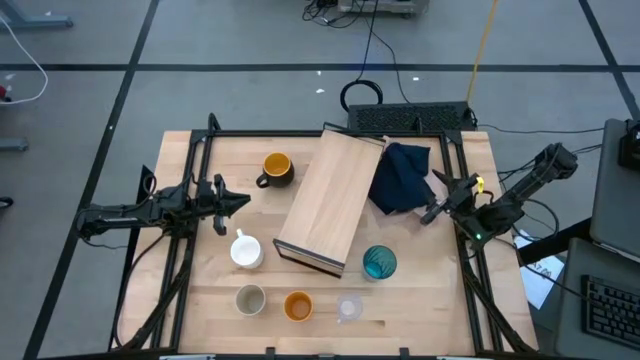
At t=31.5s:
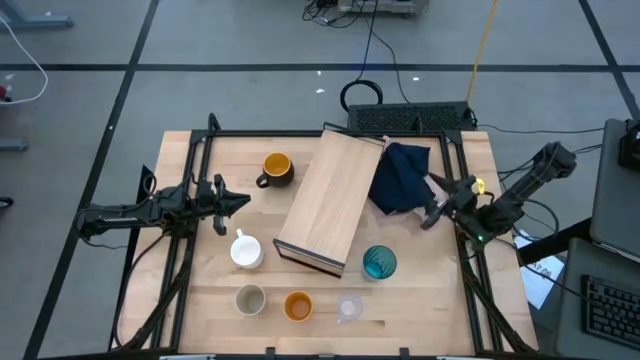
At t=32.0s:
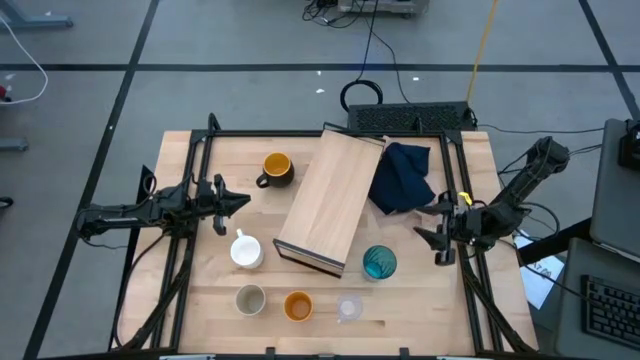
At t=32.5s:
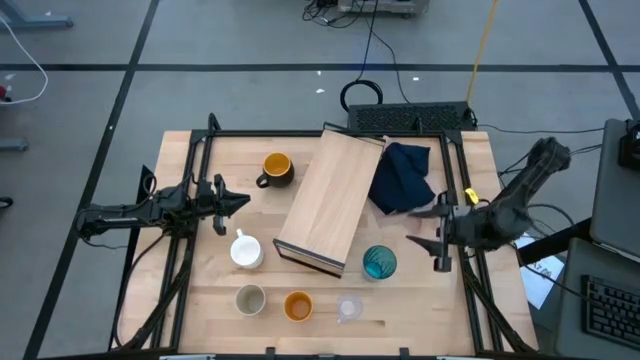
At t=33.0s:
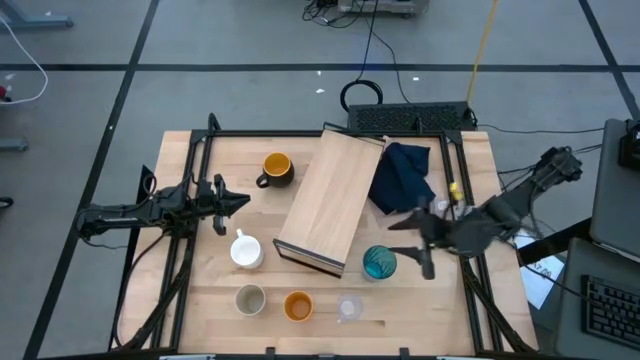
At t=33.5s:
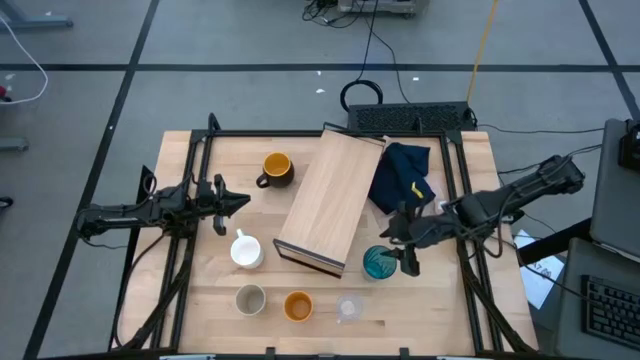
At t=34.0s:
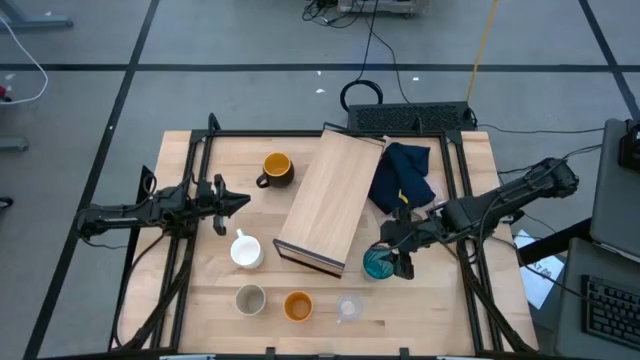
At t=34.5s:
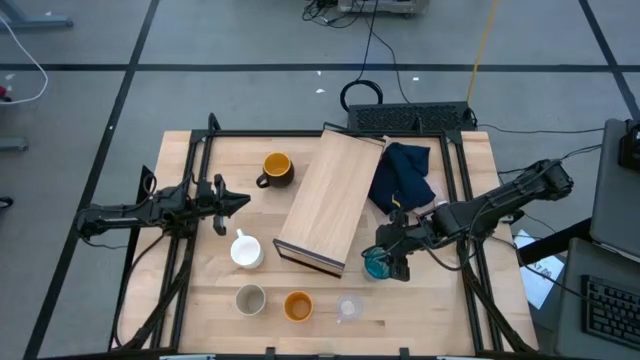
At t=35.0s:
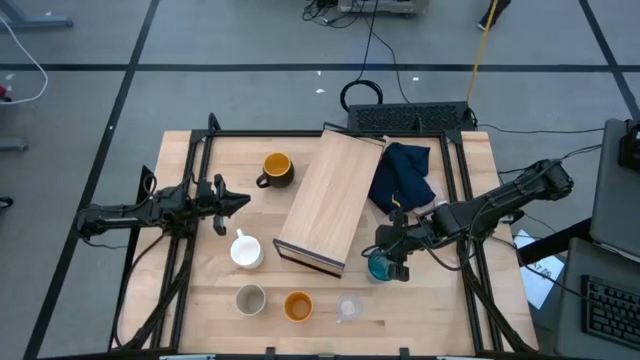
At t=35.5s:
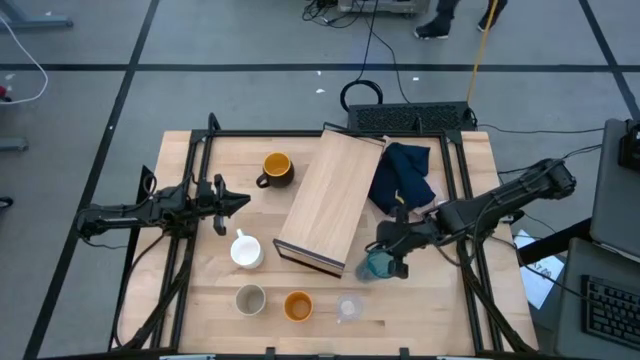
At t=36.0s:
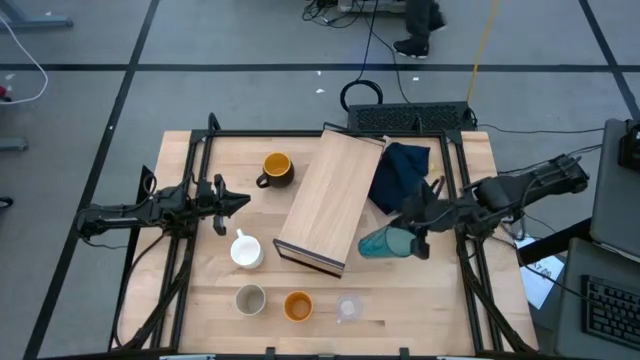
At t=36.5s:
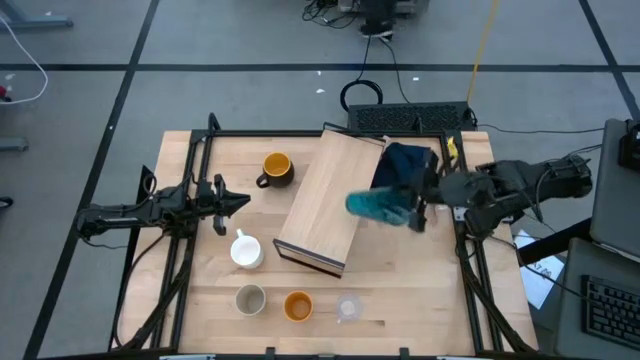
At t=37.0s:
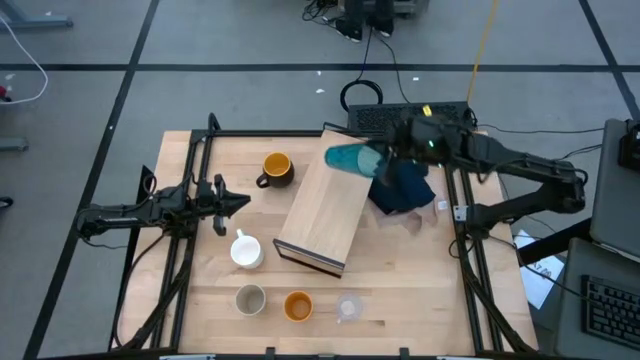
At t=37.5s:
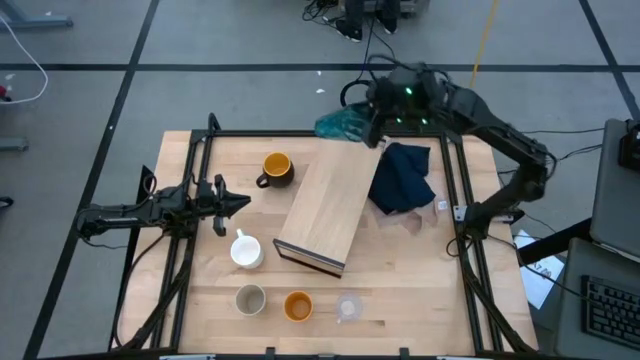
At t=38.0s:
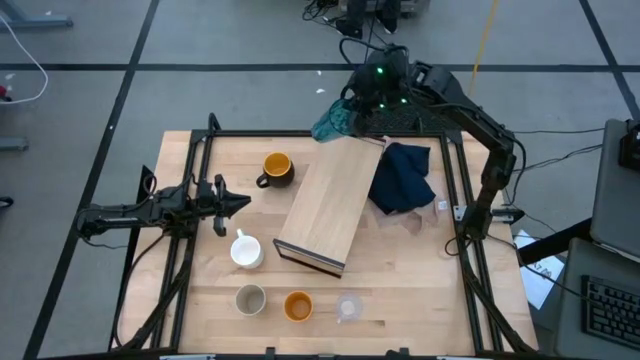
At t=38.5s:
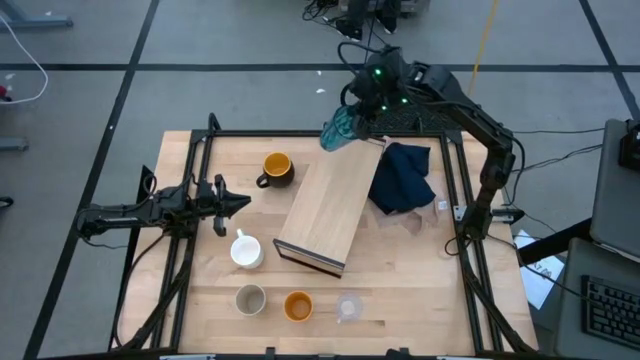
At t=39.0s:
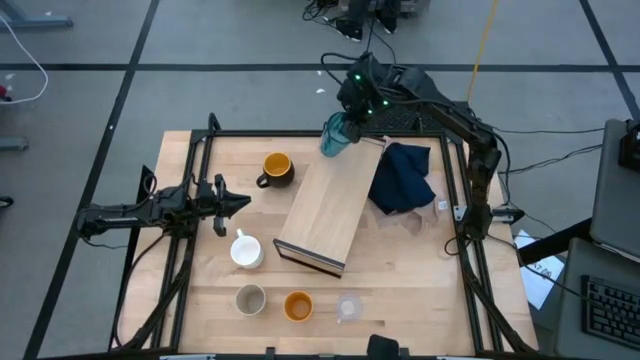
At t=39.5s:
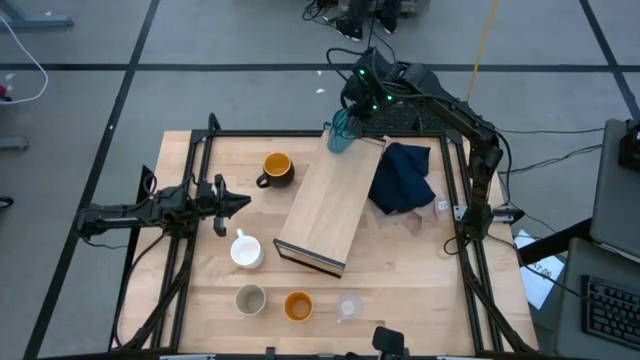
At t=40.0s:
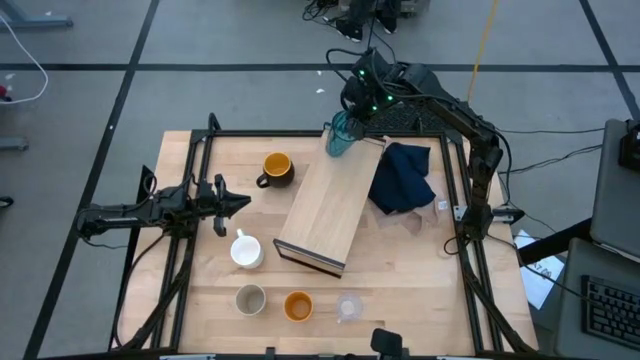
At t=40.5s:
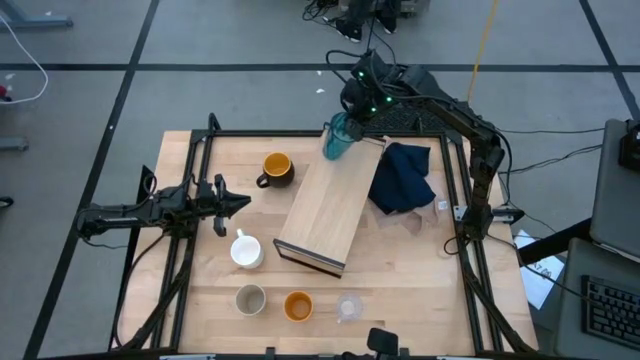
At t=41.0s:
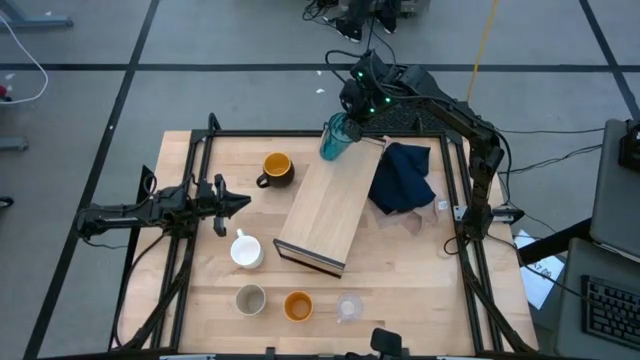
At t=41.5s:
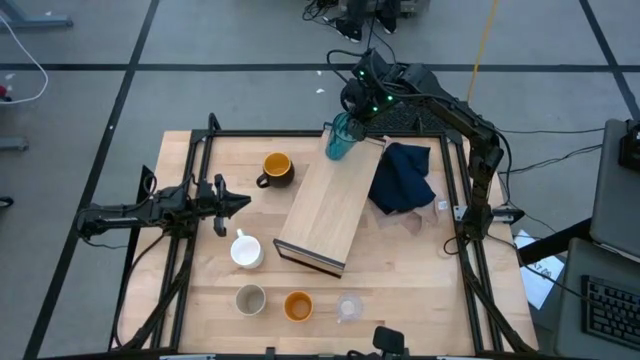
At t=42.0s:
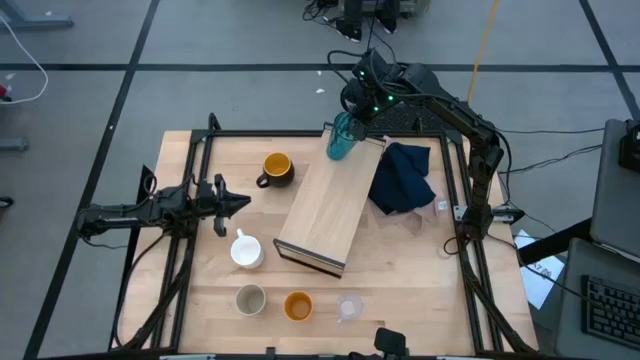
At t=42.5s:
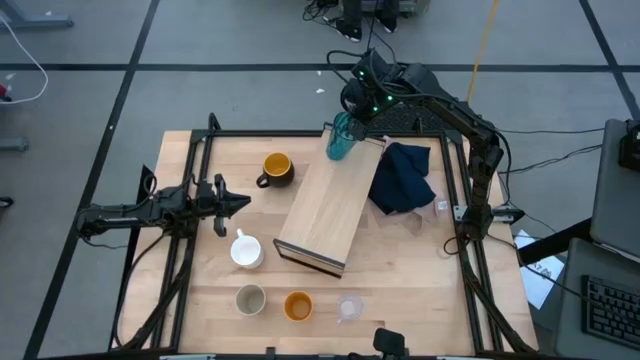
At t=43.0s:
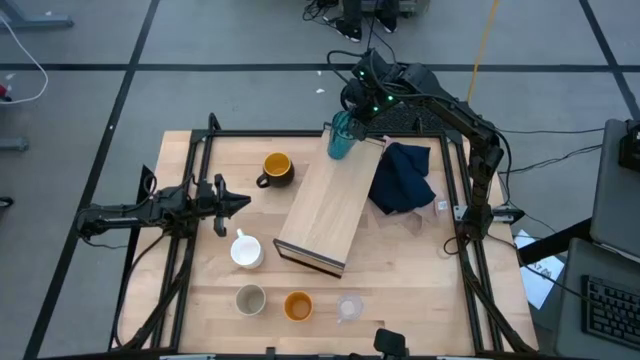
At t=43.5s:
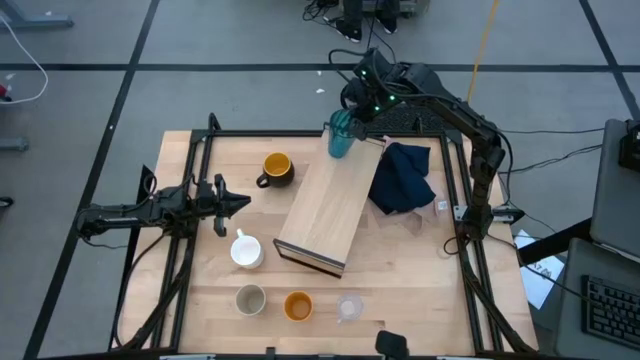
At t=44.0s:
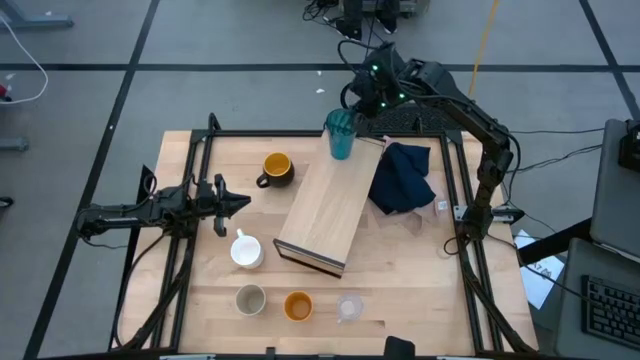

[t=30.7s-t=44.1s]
Task: Stack small to large cups/mugs on shelf
Put the blue cup on the shelf

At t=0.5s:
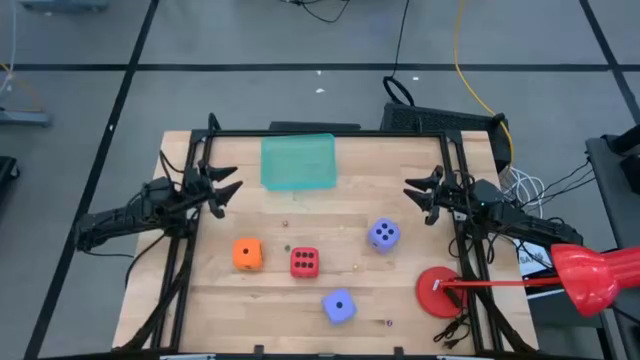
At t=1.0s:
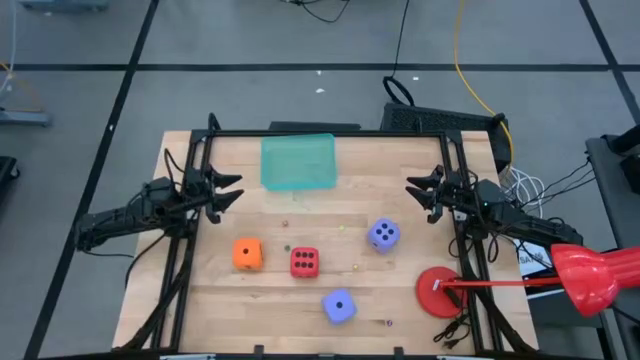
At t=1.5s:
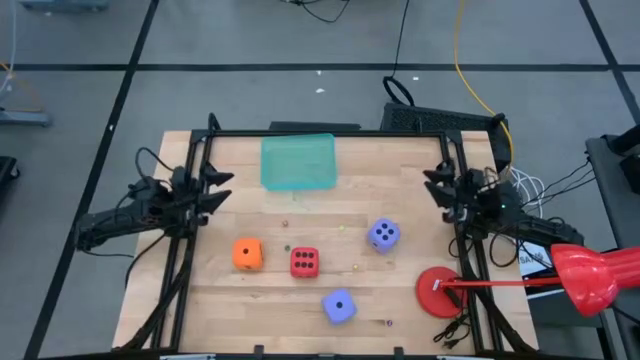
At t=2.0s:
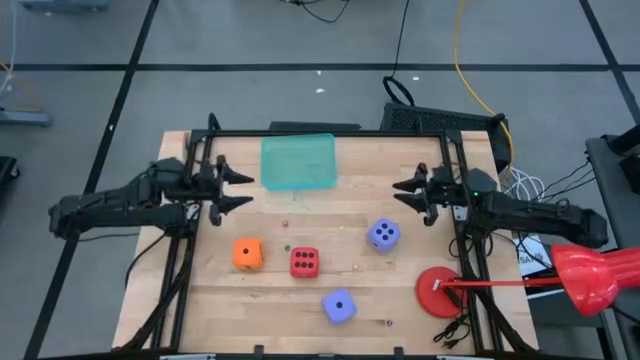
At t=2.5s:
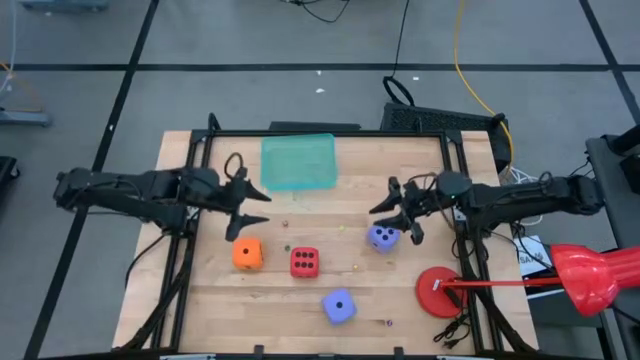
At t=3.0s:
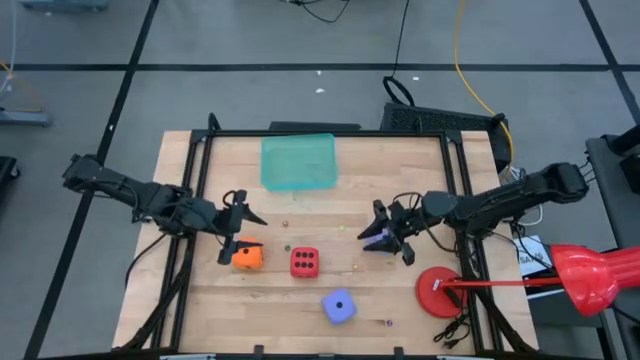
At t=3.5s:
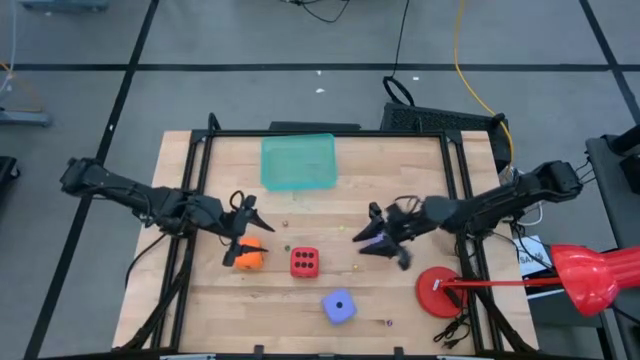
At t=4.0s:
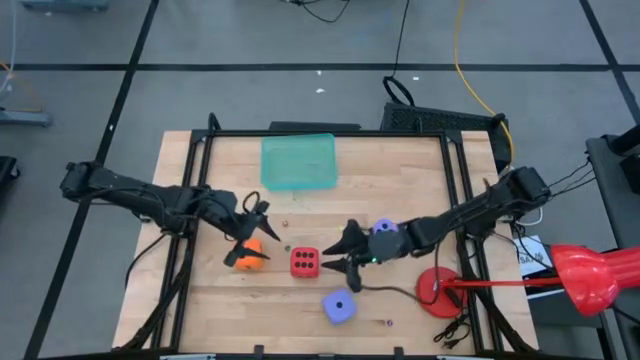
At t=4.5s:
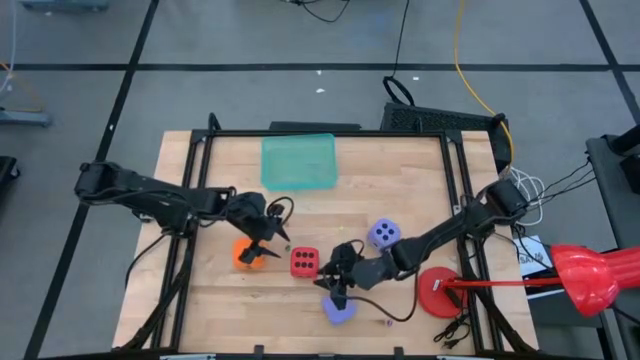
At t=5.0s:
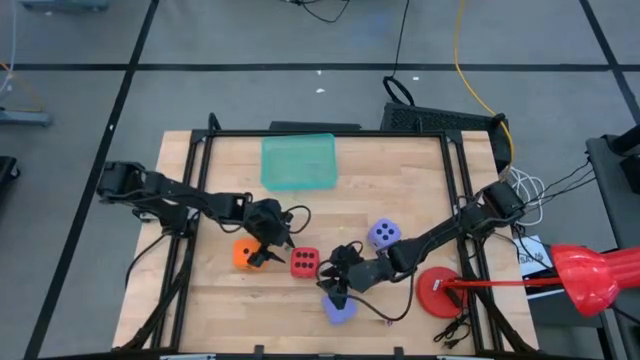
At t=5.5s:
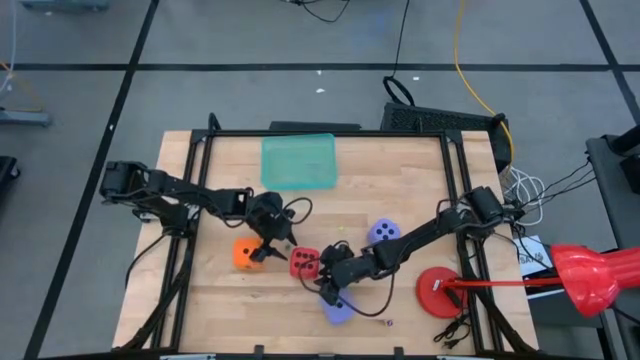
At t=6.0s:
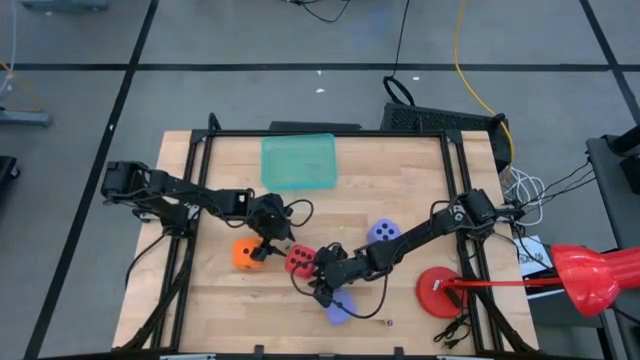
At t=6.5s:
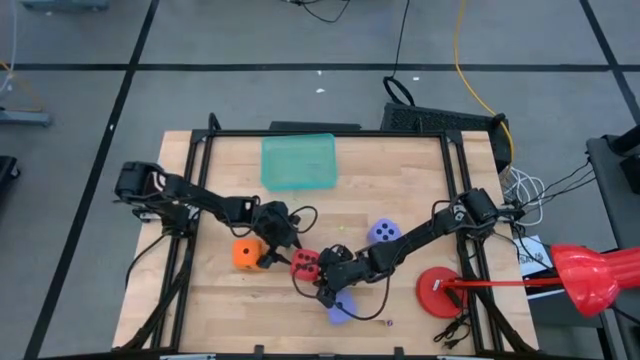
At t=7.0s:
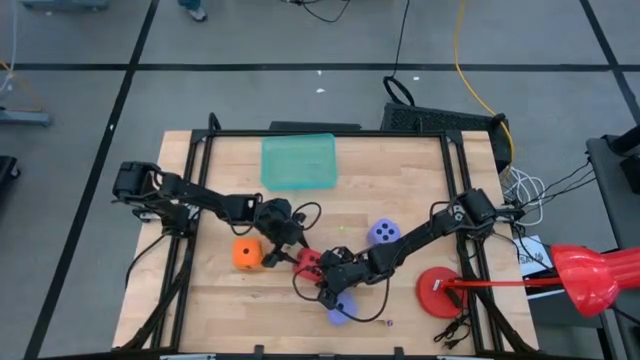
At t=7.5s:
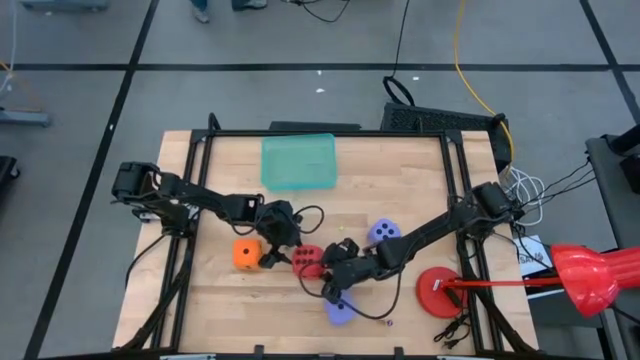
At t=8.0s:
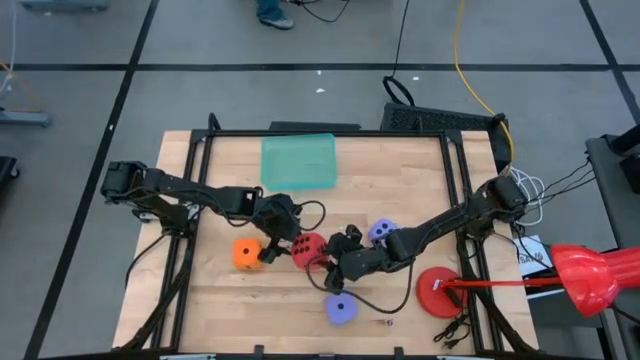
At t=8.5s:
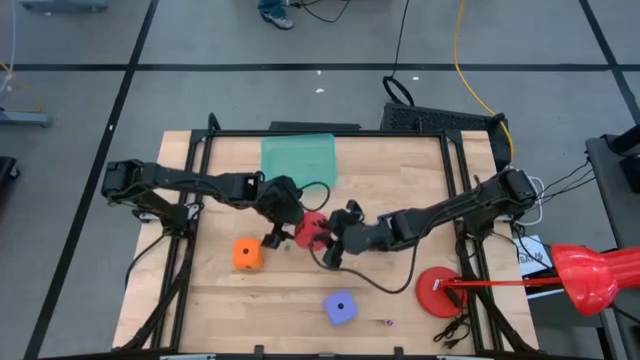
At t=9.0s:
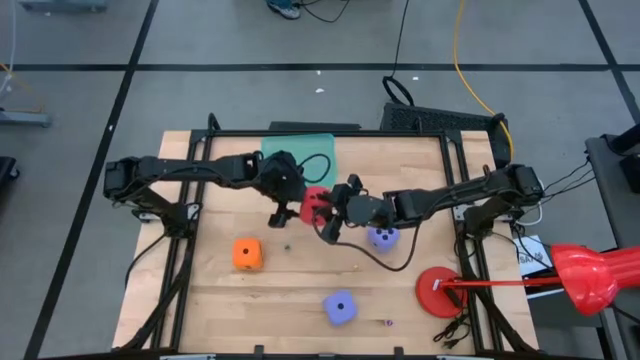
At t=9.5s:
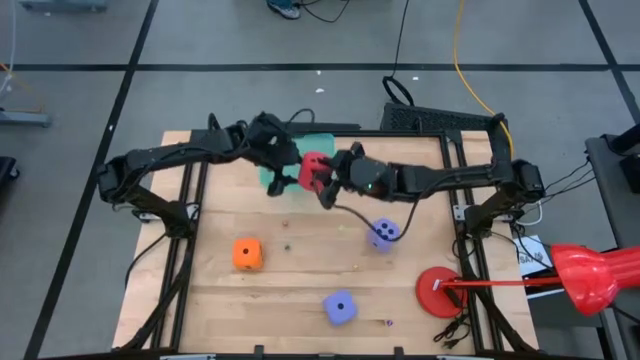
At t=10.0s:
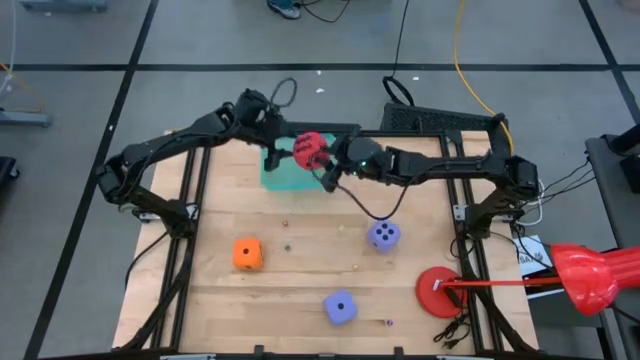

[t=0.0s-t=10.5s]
Task: Pick & Place Dice
Put the large red dice into the green bin
